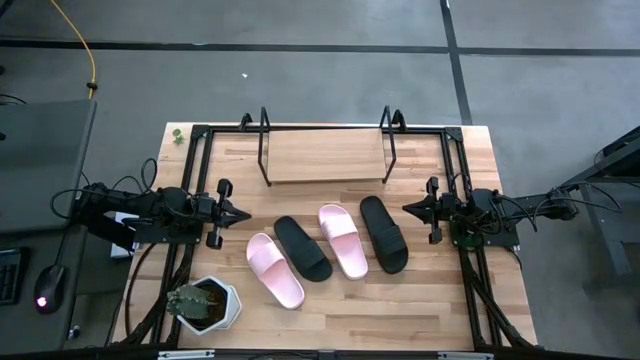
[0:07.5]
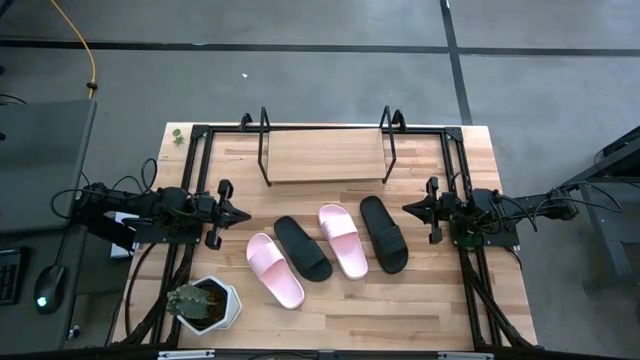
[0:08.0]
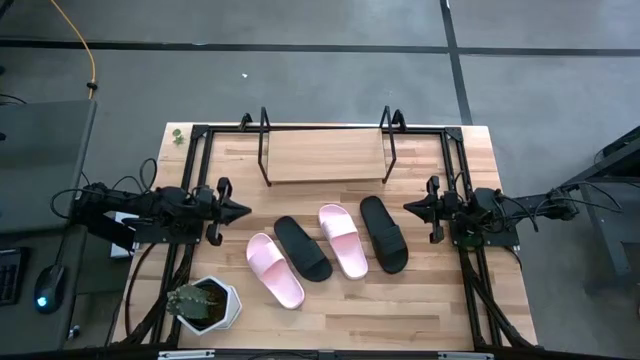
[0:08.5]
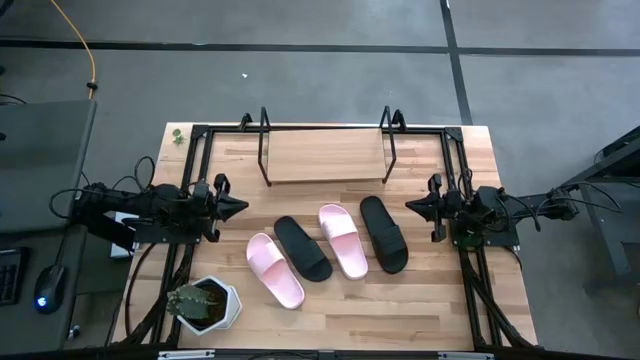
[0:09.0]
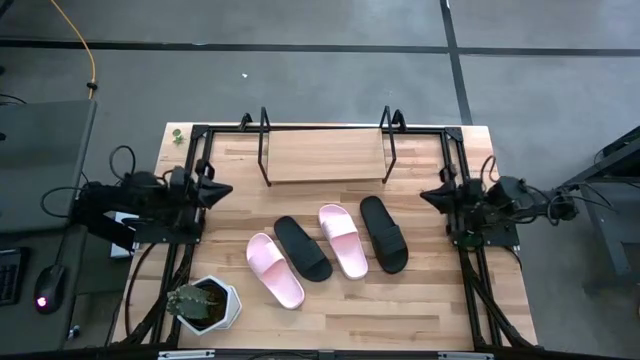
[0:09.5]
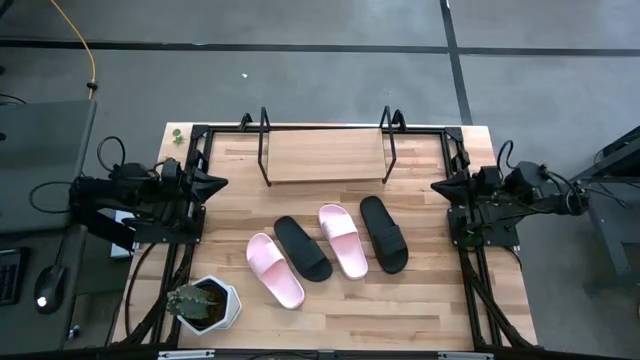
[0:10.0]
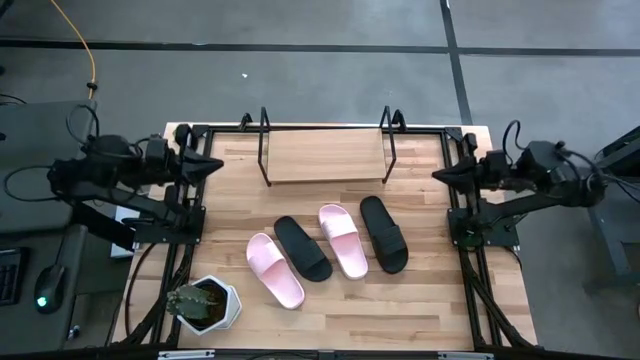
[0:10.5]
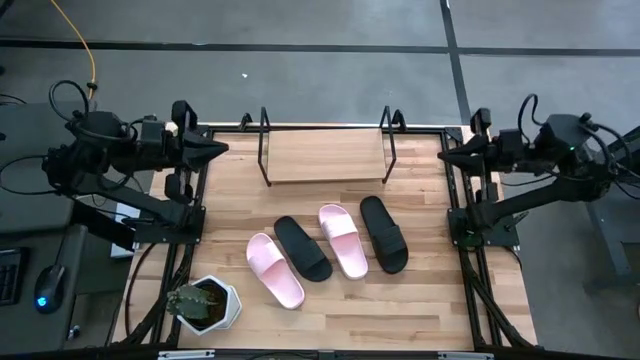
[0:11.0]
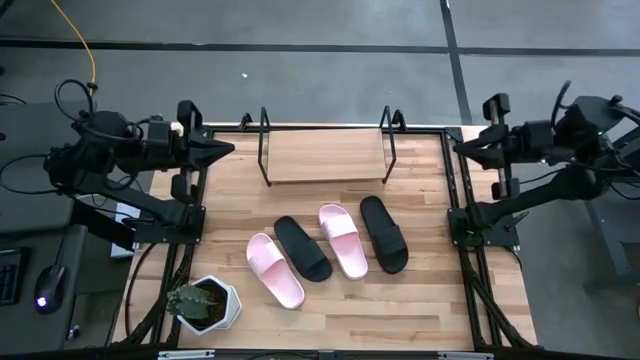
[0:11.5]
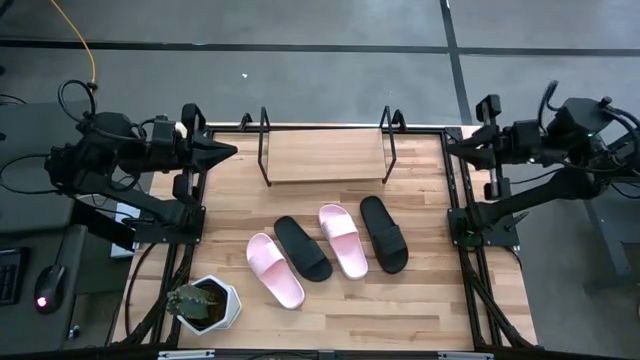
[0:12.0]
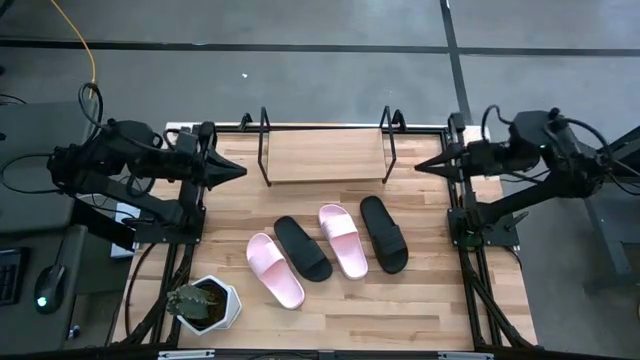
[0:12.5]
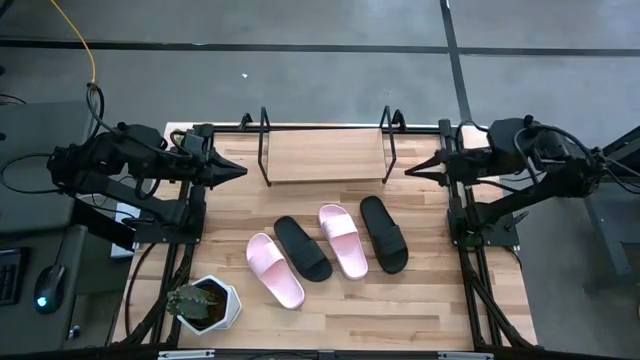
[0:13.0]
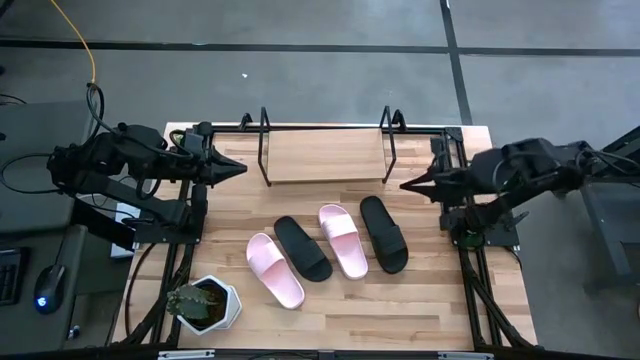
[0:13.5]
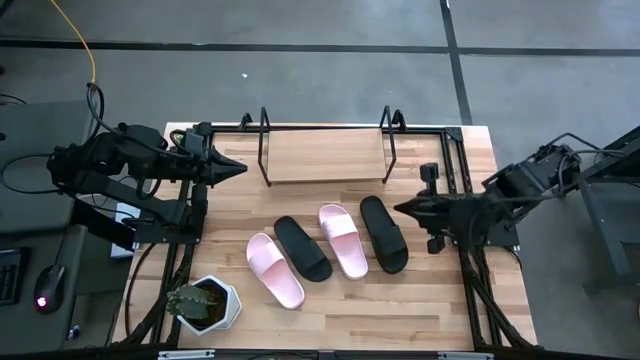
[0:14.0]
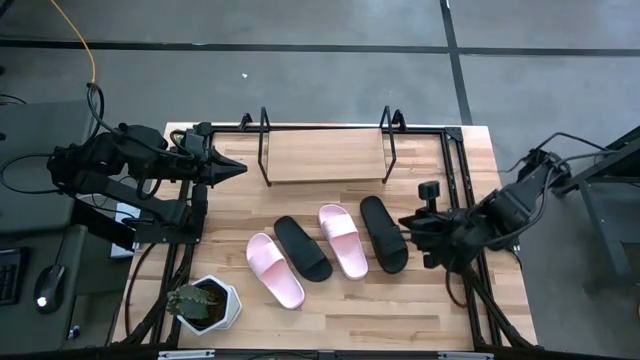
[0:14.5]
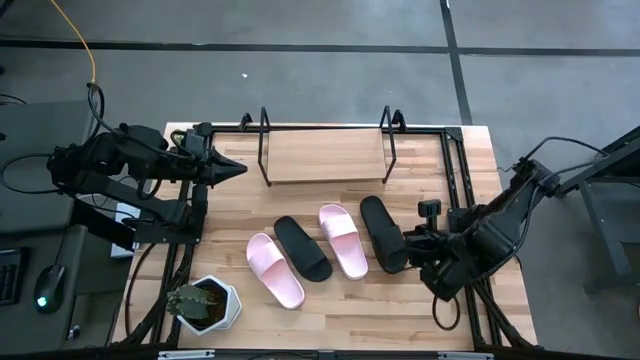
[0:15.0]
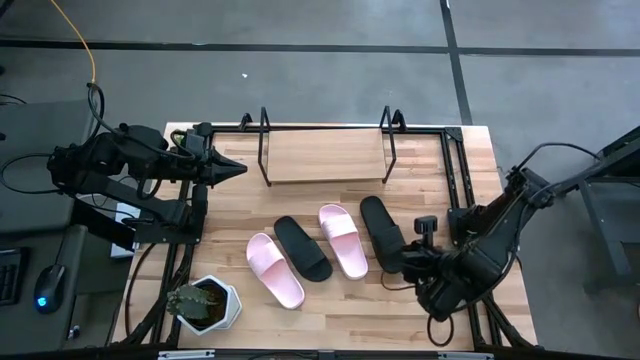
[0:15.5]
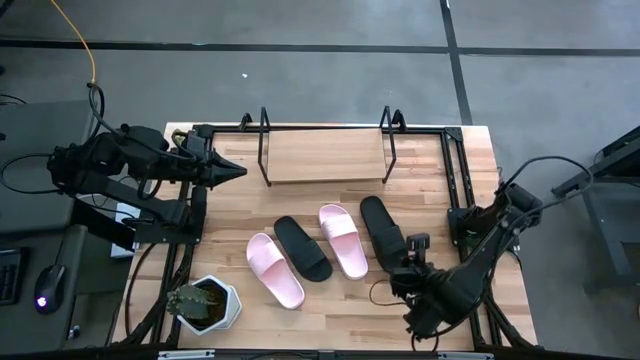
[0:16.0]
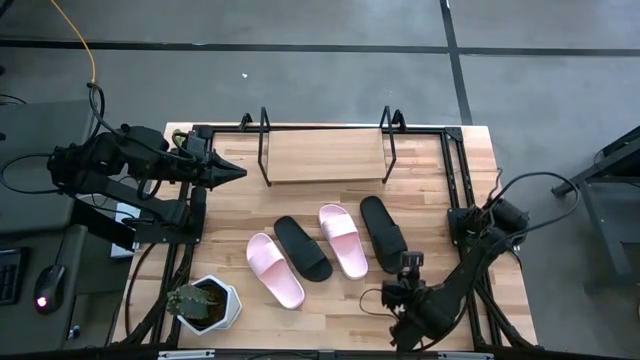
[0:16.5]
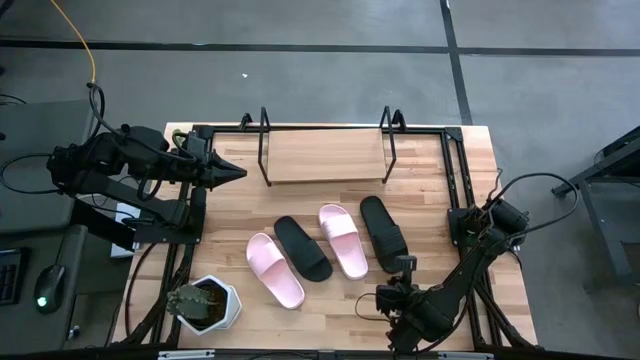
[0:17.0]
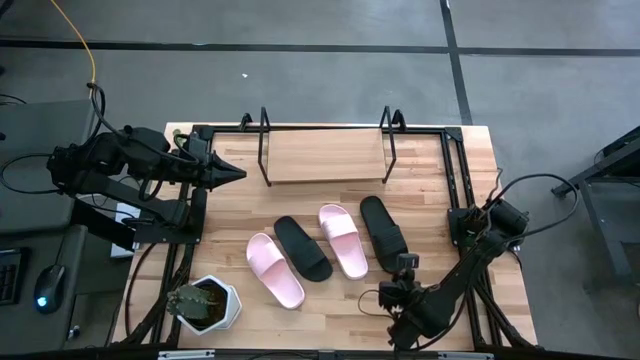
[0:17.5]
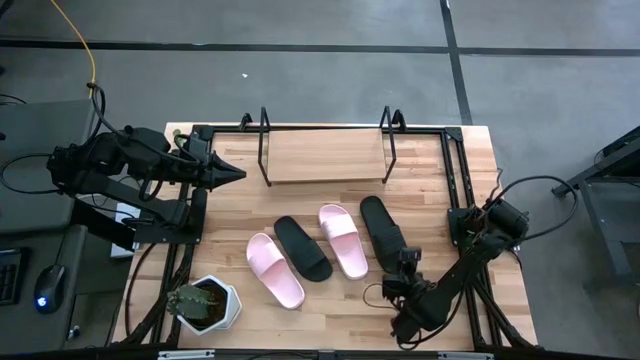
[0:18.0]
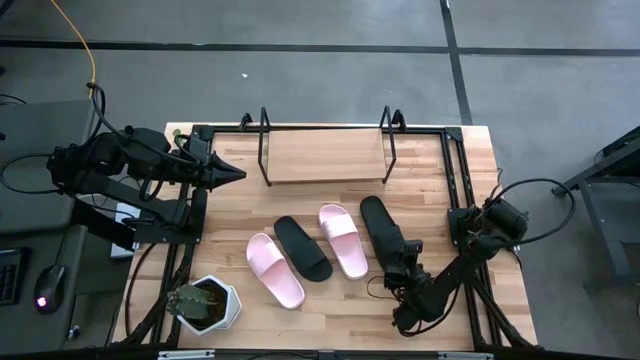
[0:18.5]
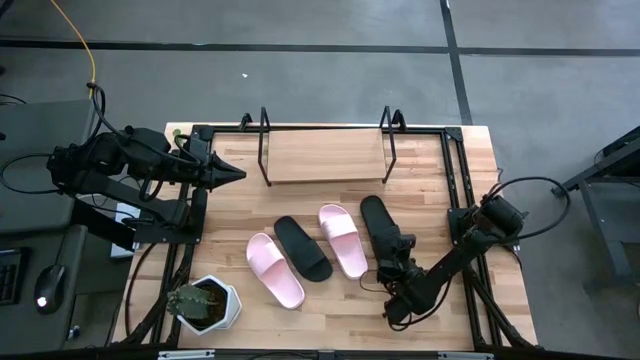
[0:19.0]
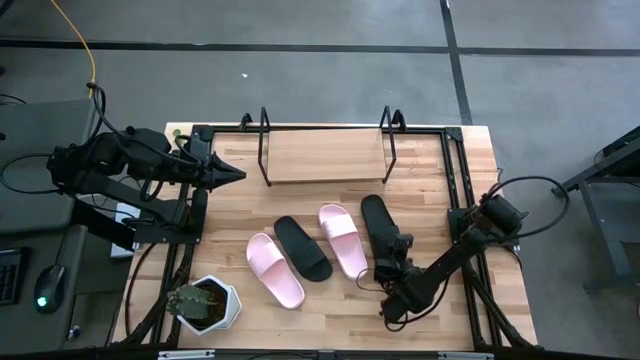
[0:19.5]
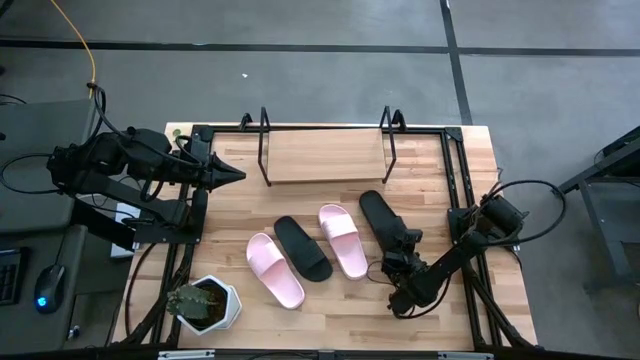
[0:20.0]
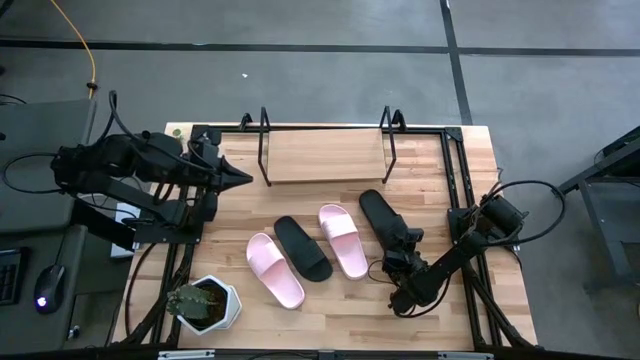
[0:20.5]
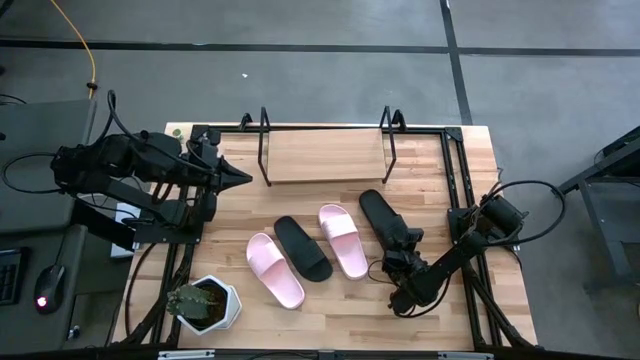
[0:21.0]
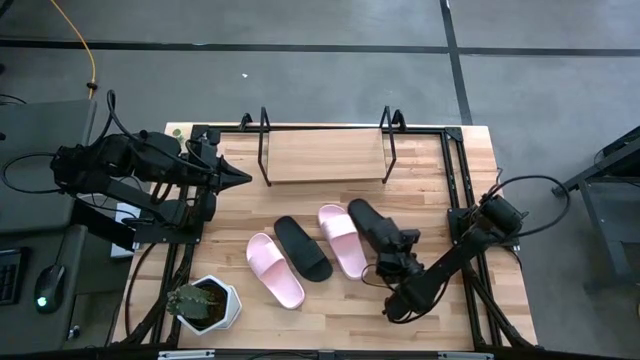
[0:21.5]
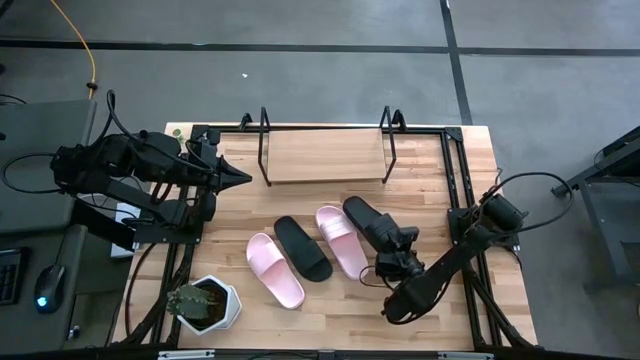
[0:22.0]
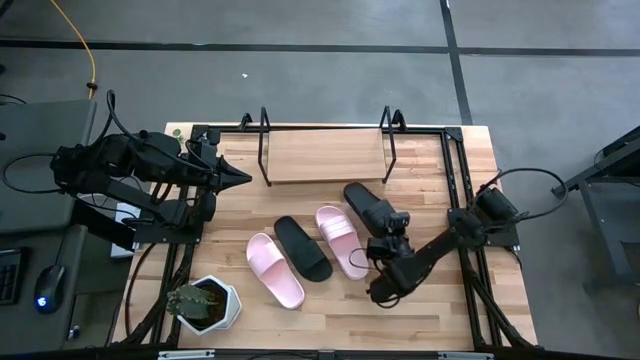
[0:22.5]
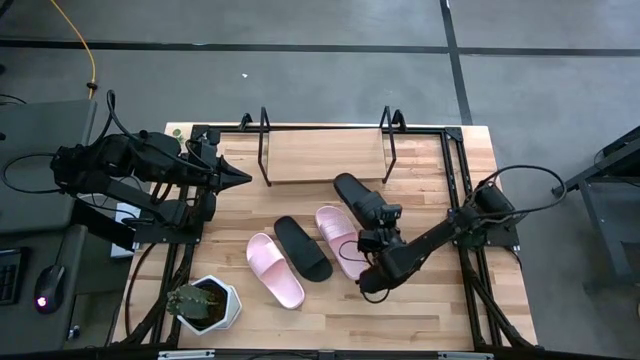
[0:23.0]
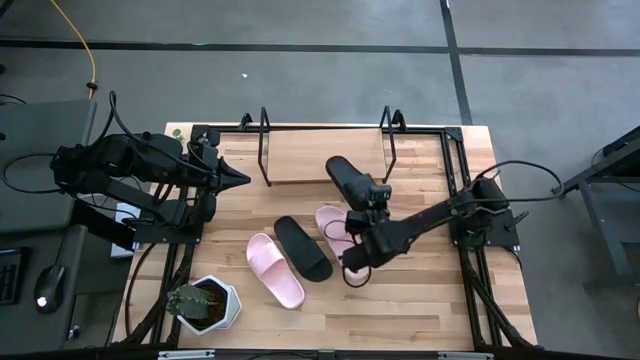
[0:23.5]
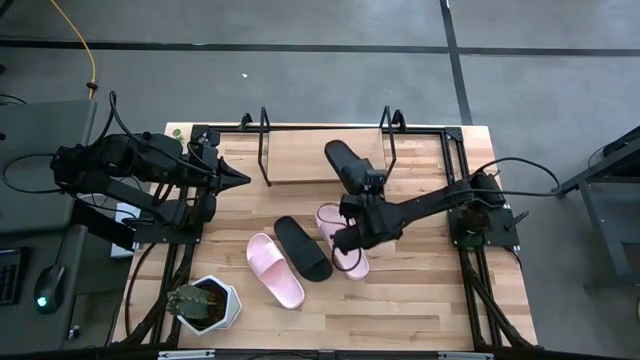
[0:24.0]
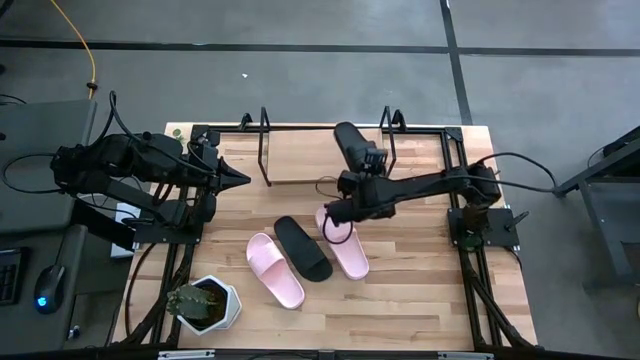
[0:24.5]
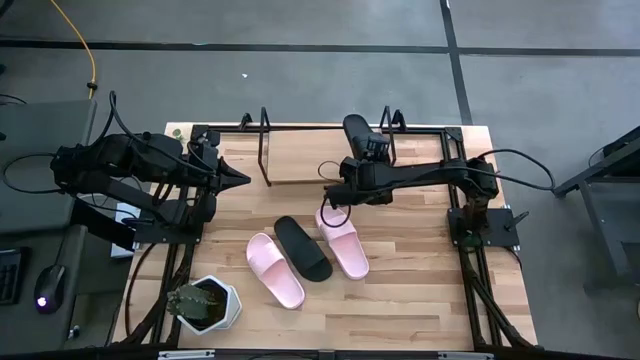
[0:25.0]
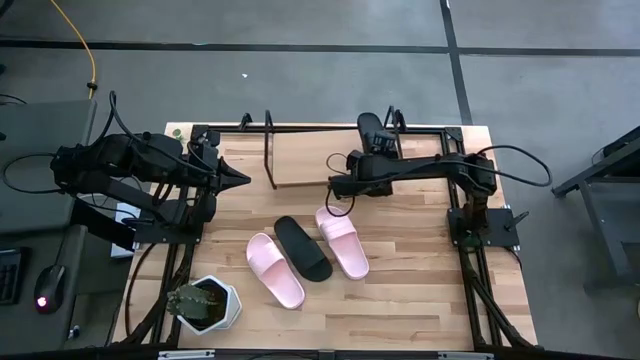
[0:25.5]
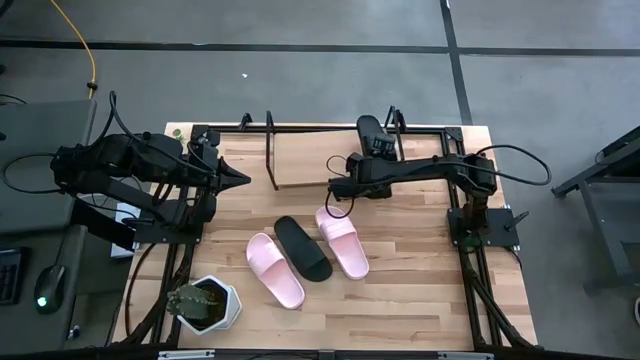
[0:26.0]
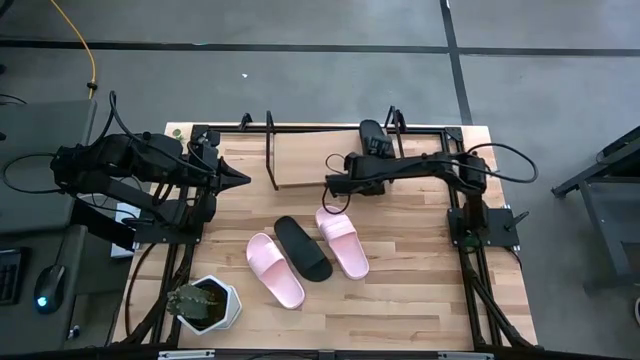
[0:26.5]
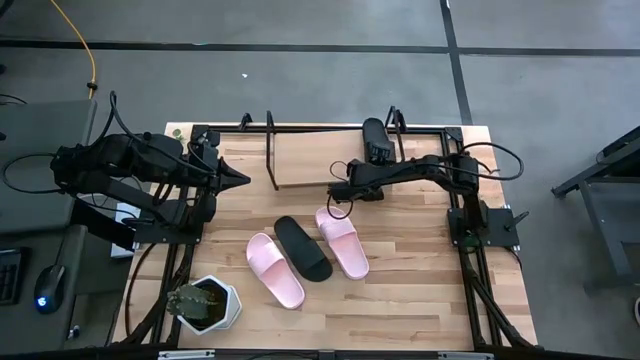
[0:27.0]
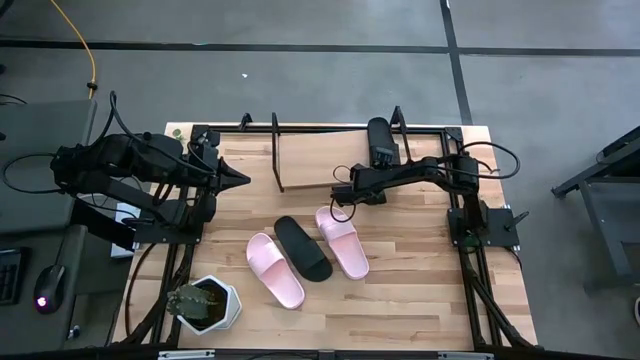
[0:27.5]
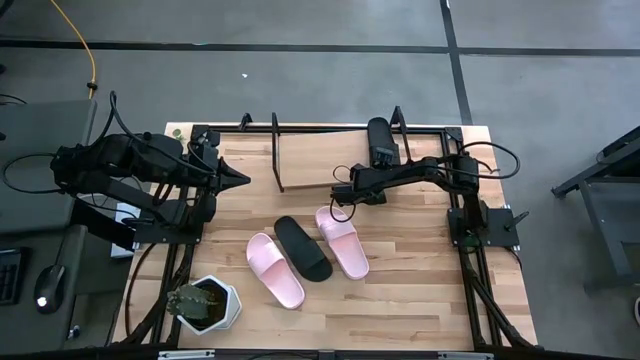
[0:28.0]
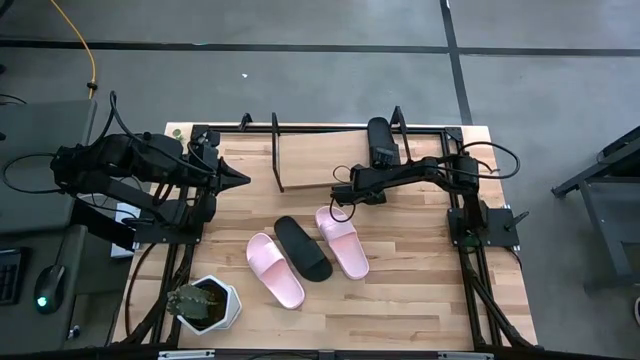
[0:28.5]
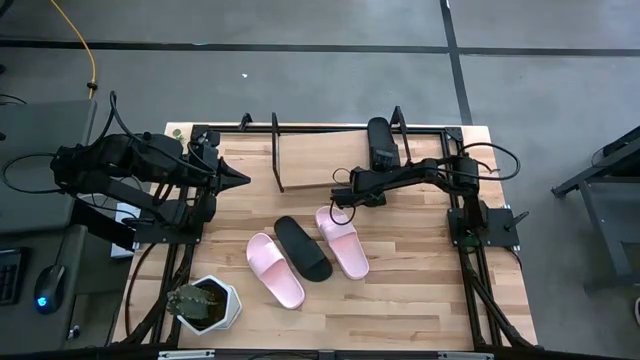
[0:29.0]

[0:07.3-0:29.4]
Task: Pick and place slides into the shelf
Put the right black slide on the shelf
